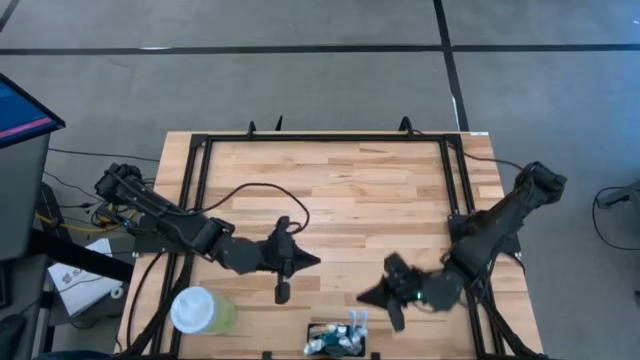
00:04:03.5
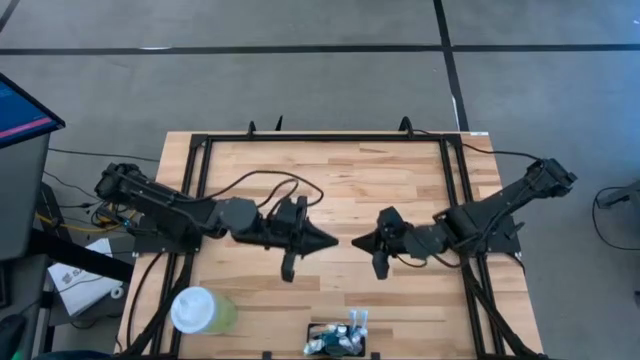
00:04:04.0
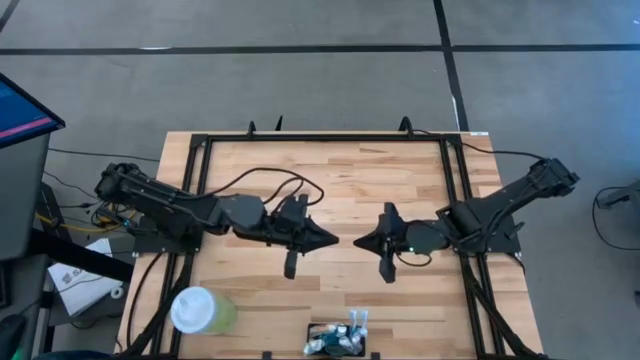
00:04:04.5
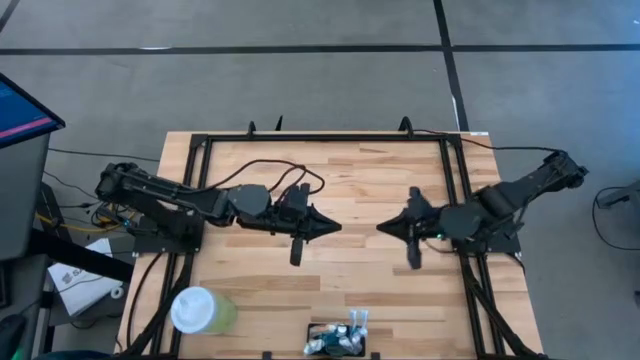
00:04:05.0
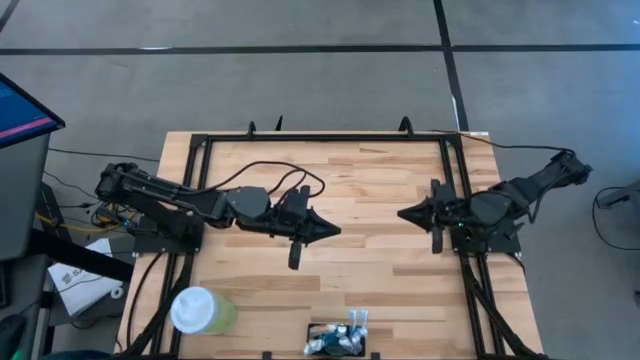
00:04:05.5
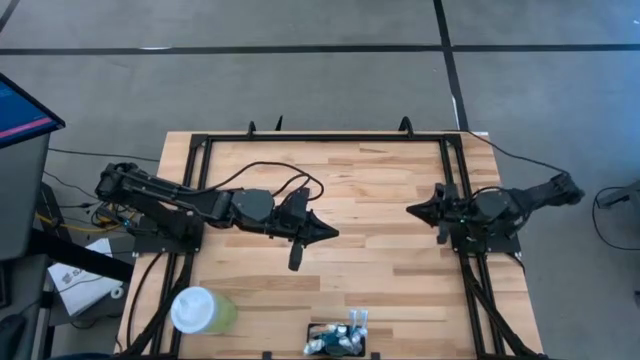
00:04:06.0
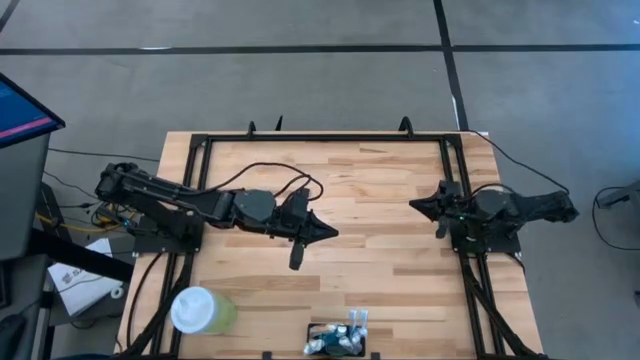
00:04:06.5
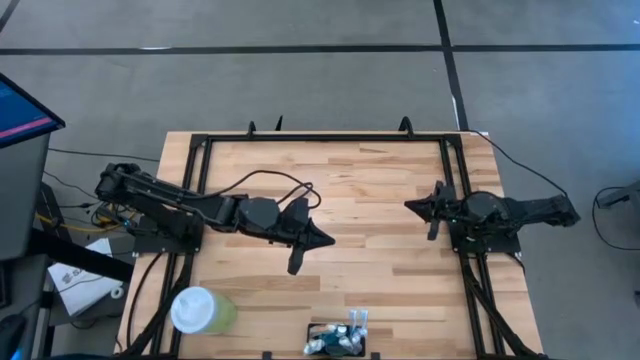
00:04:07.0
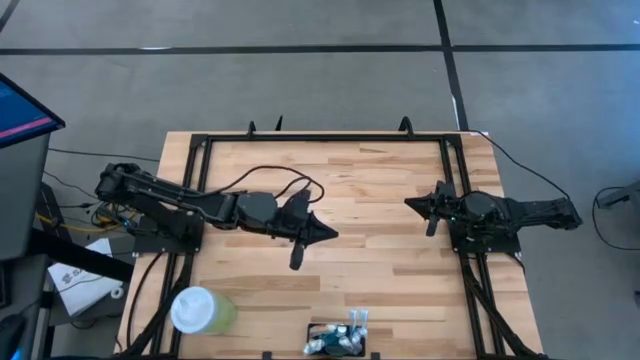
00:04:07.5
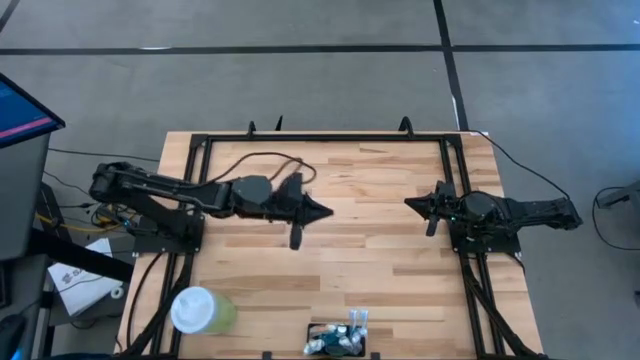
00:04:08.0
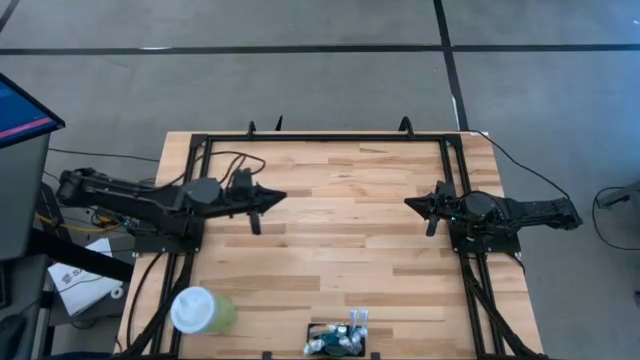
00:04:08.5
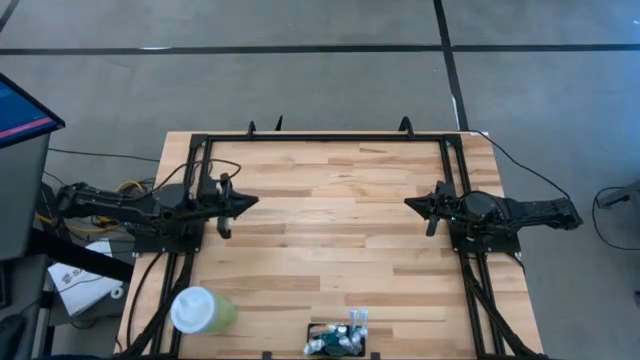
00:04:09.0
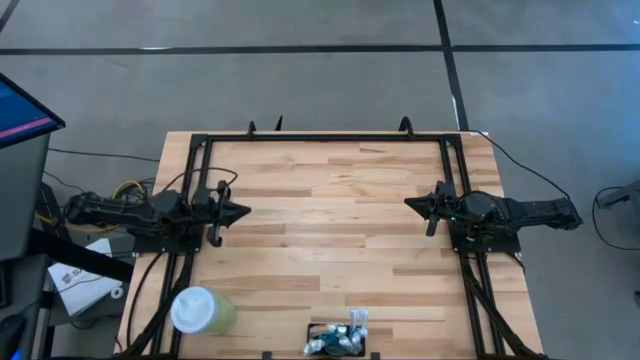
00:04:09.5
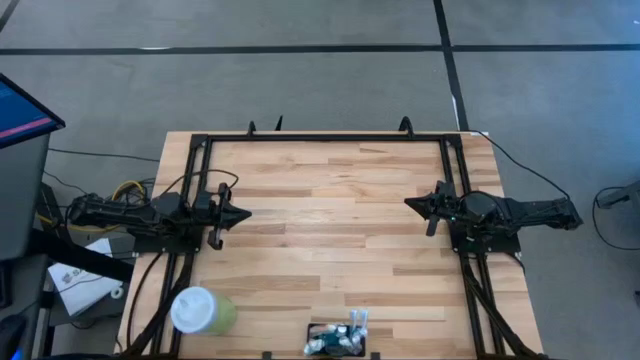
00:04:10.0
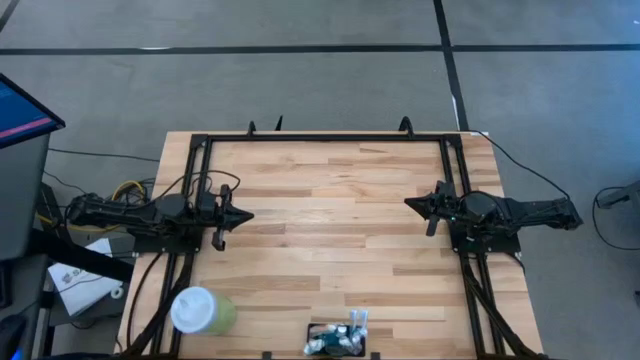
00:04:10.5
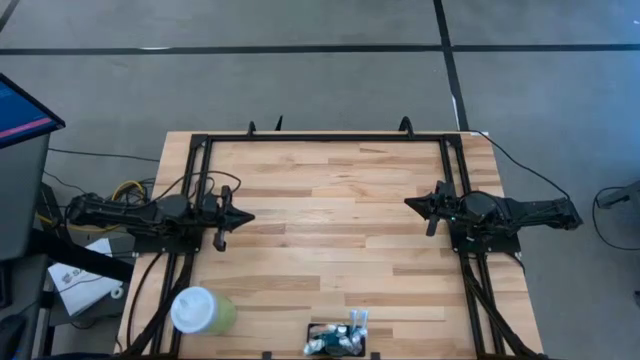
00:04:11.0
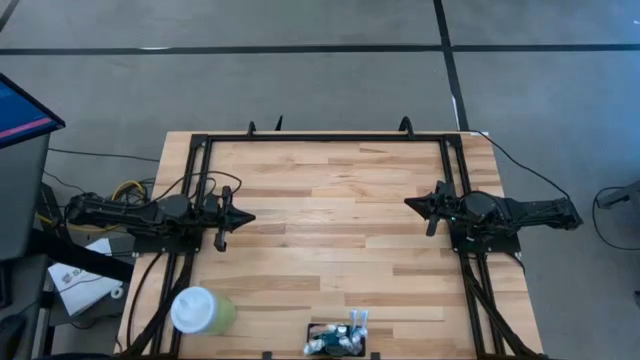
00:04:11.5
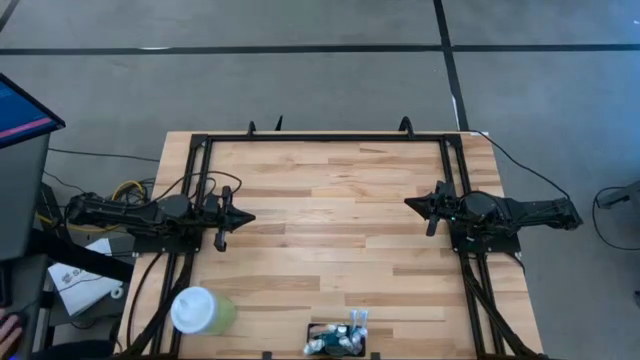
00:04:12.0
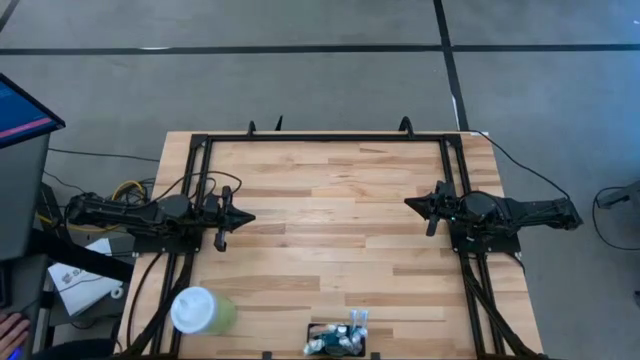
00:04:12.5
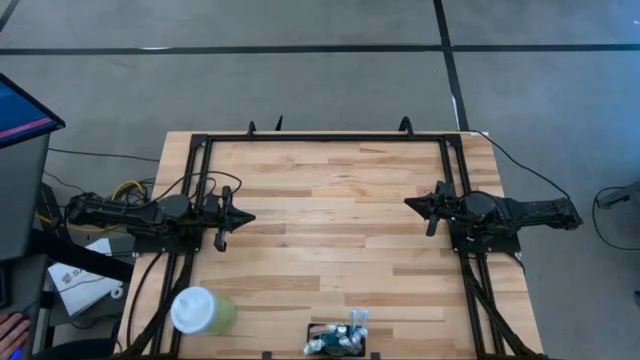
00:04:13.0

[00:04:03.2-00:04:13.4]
Task: Pick & Place toothbrushing station
Return to Home Position
